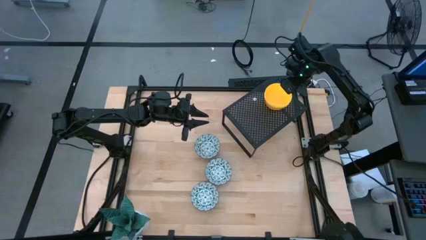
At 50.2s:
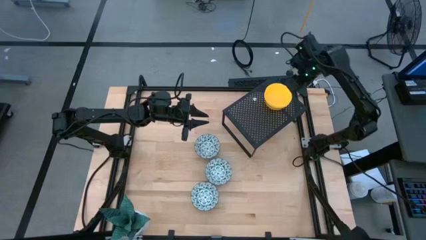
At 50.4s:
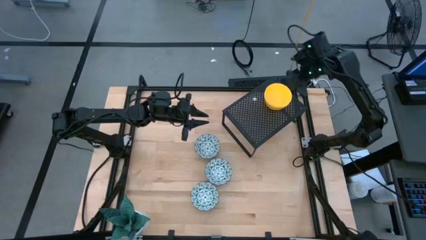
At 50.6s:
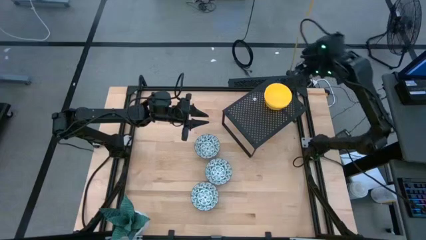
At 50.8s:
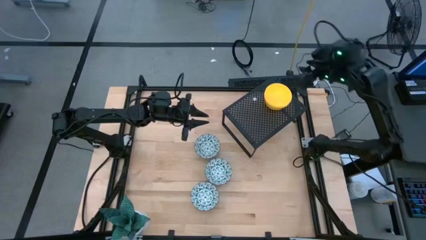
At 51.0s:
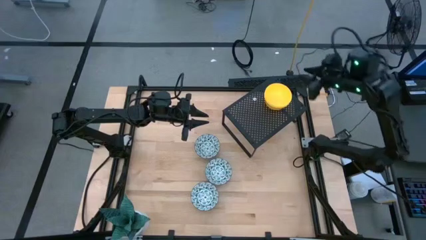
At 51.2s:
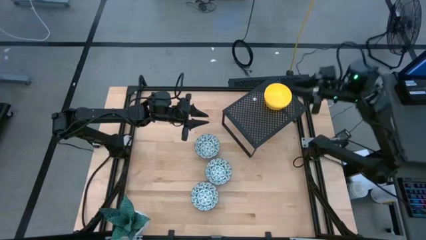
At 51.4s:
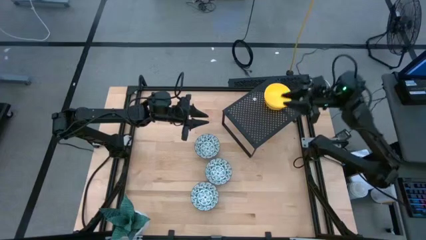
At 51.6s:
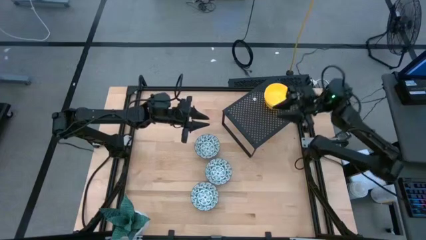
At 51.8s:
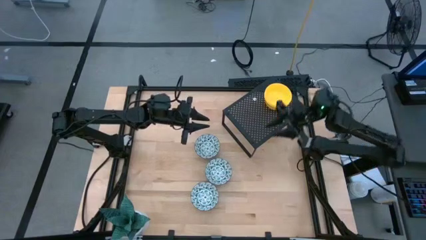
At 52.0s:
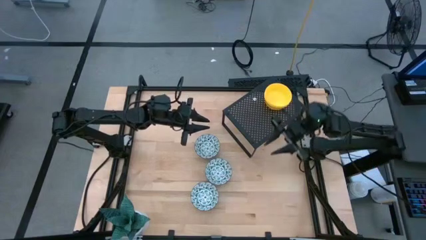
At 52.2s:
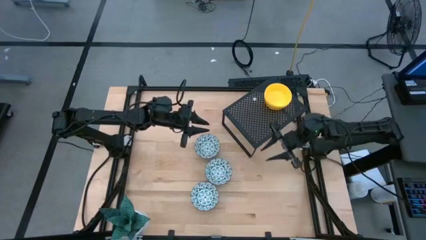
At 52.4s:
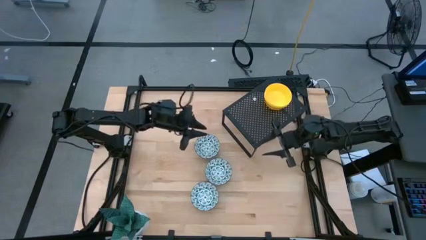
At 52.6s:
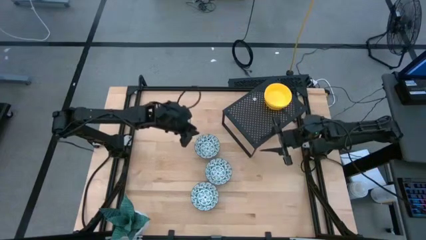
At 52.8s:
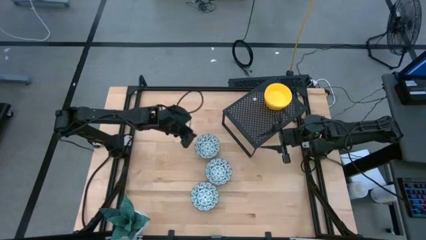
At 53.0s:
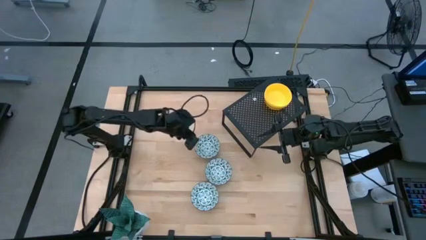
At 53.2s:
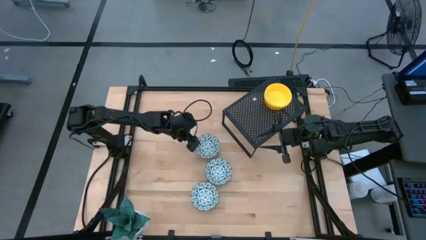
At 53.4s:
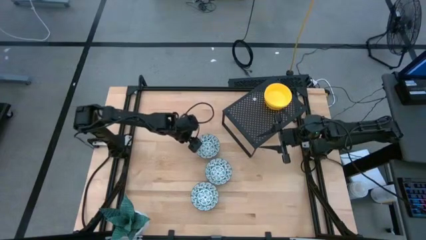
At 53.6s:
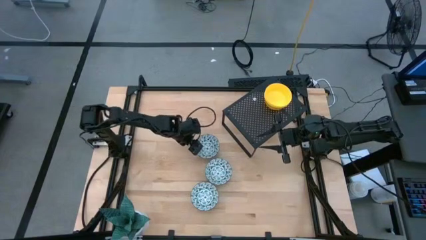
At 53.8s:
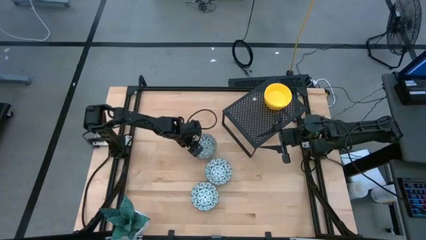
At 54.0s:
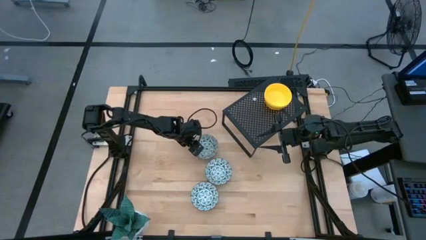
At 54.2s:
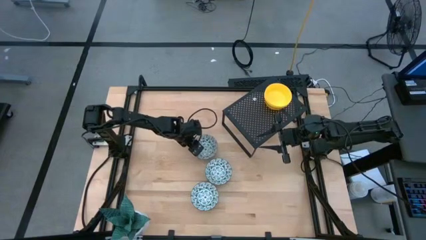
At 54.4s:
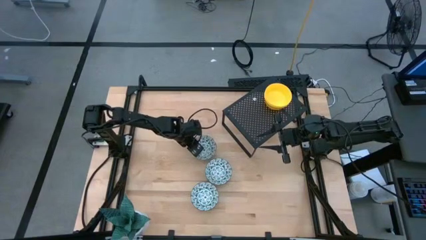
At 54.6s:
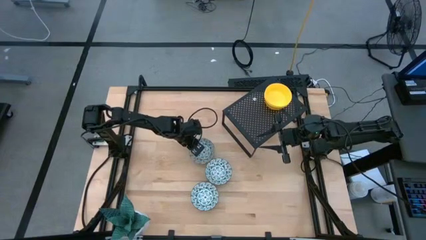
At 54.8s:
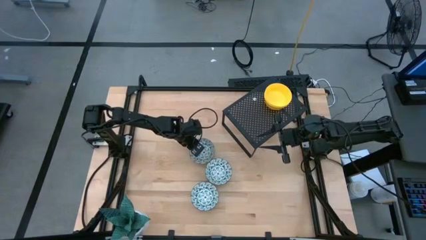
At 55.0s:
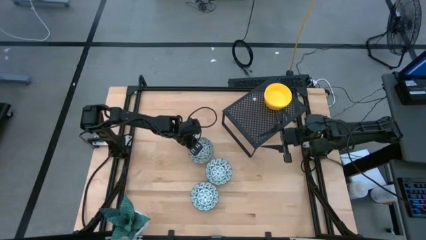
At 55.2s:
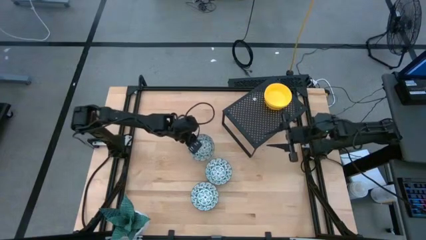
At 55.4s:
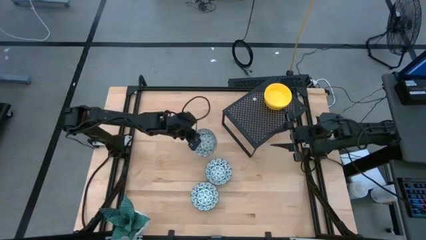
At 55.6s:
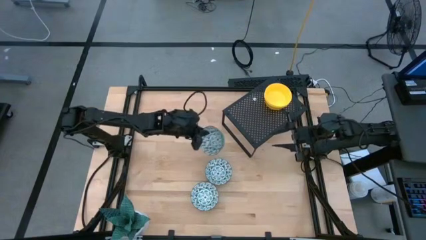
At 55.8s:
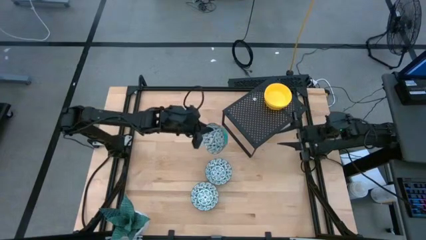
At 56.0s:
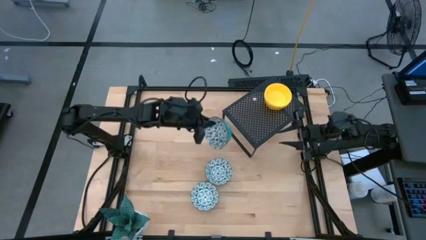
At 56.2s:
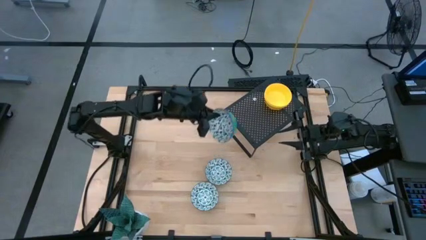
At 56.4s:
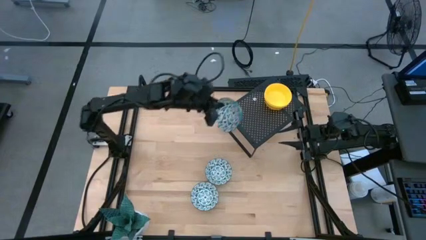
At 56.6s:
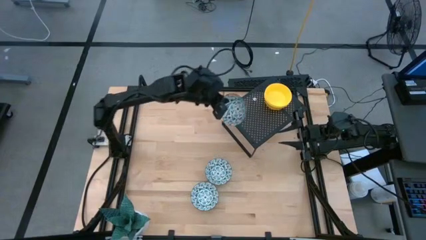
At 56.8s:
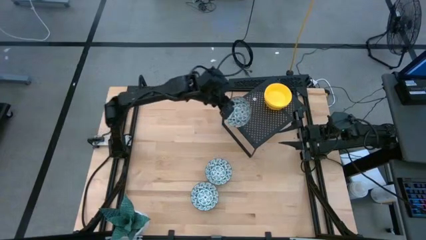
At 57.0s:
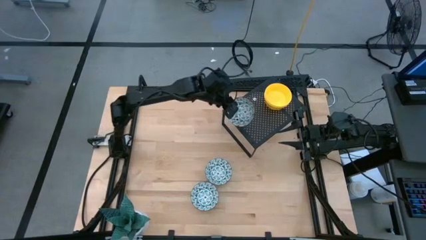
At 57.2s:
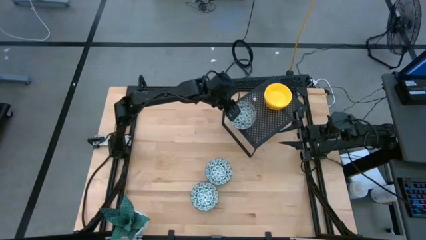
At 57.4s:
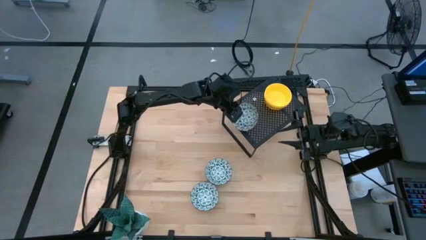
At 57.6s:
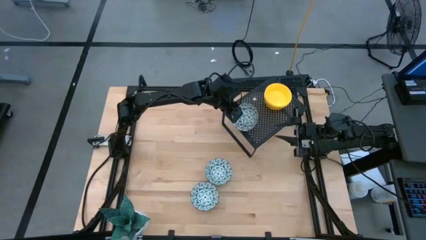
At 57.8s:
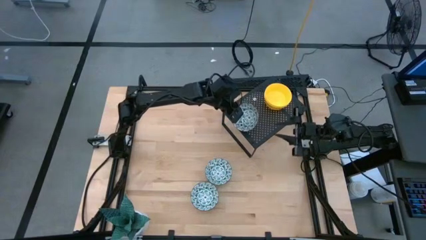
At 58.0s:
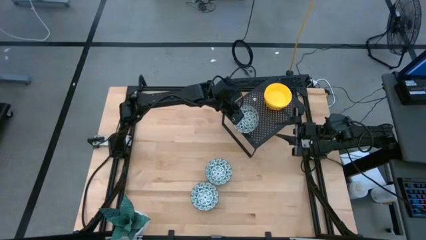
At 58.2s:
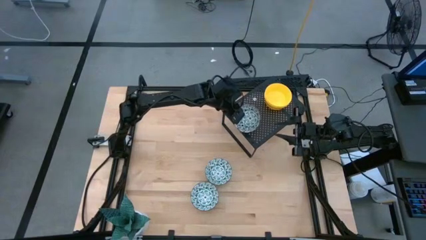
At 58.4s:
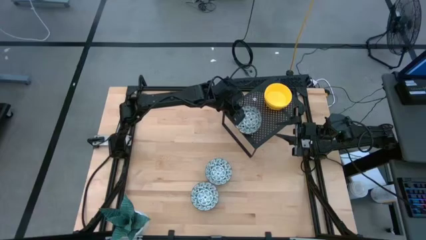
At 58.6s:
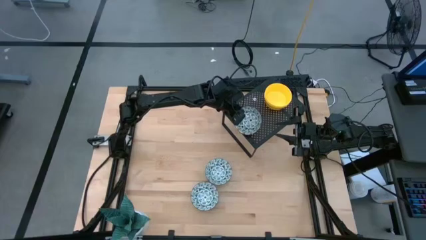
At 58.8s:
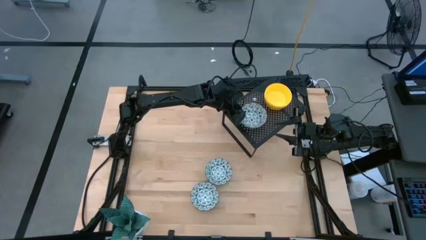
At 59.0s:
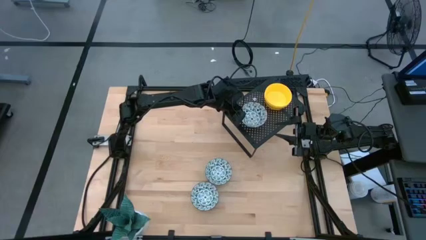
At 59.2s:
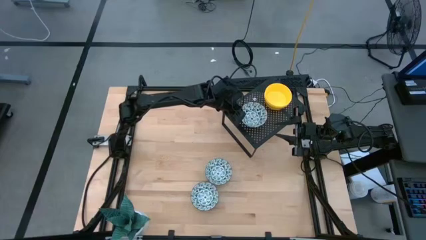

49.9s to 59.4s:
Task: Pick & Place Mini bowls
Put the top blue patterned bowl on the shelf

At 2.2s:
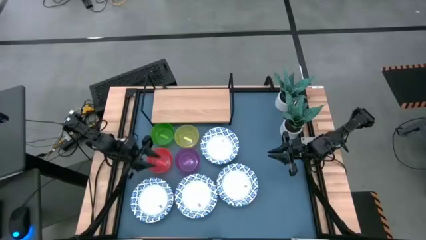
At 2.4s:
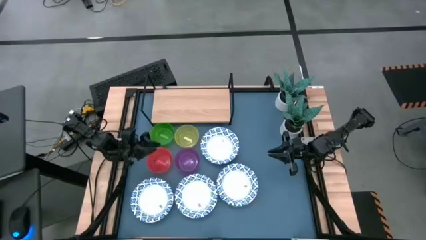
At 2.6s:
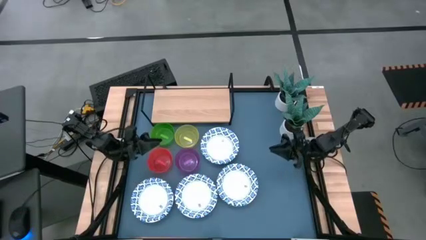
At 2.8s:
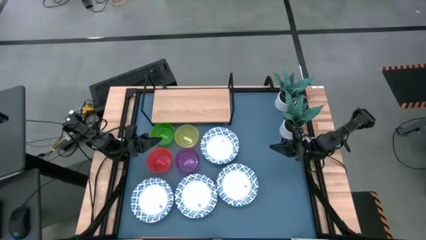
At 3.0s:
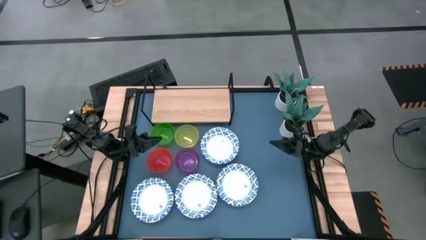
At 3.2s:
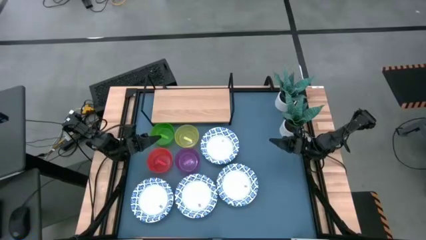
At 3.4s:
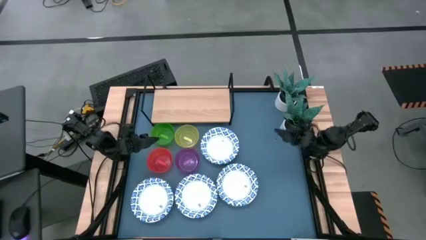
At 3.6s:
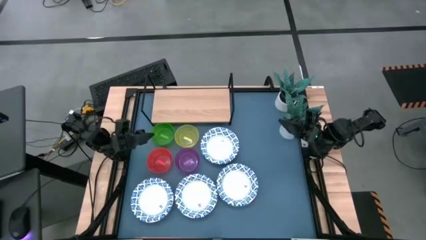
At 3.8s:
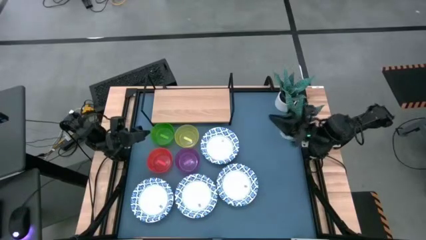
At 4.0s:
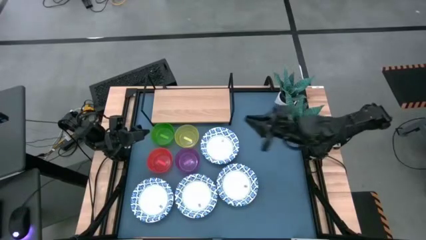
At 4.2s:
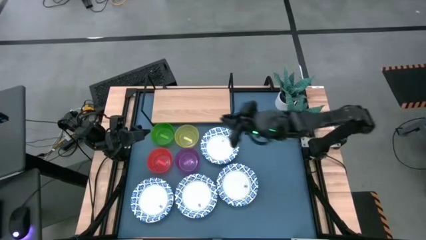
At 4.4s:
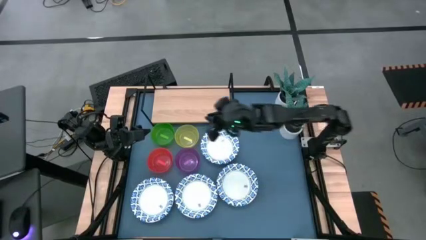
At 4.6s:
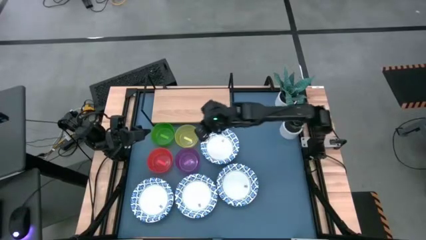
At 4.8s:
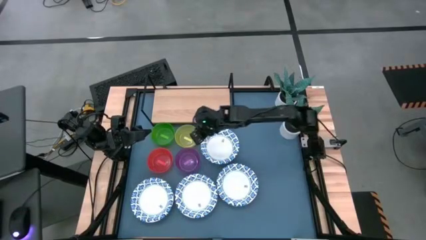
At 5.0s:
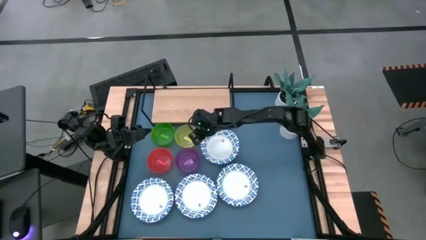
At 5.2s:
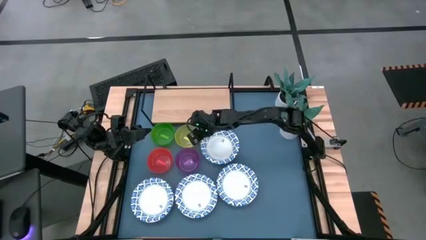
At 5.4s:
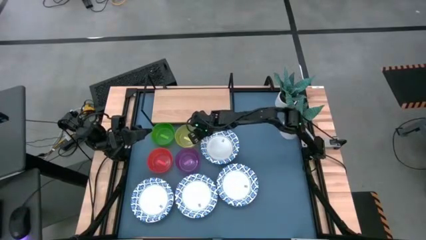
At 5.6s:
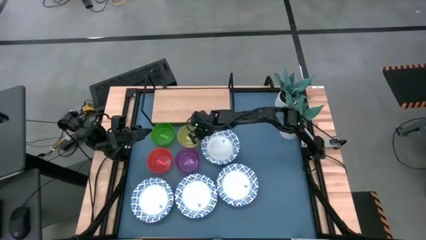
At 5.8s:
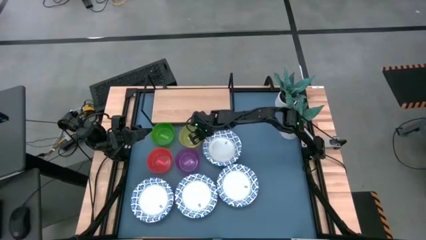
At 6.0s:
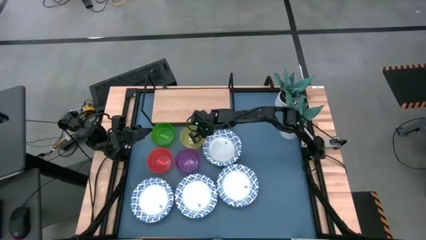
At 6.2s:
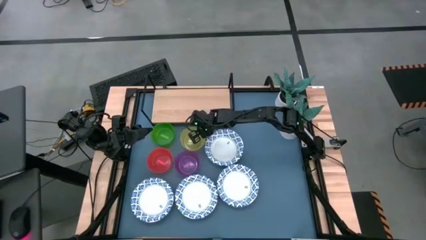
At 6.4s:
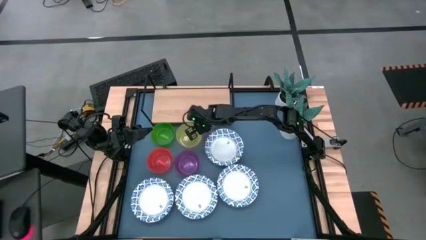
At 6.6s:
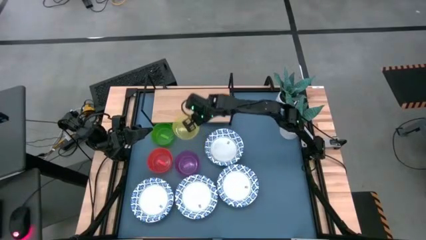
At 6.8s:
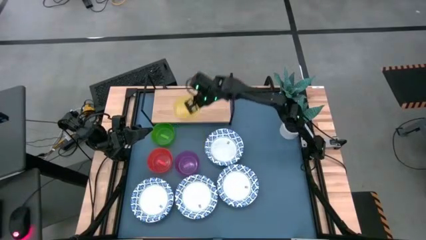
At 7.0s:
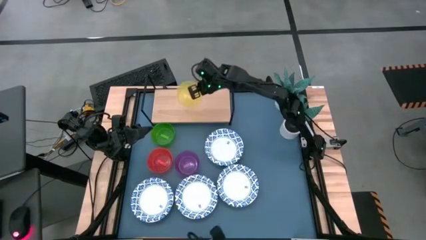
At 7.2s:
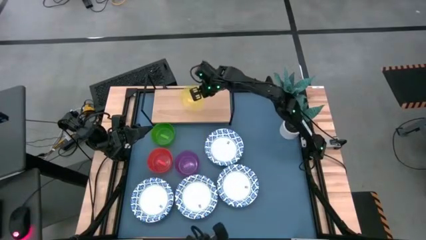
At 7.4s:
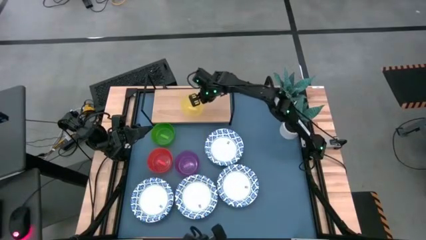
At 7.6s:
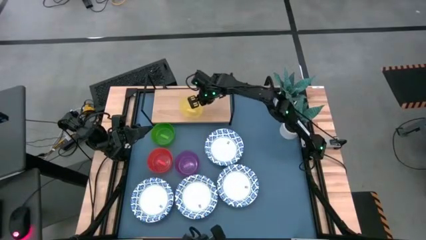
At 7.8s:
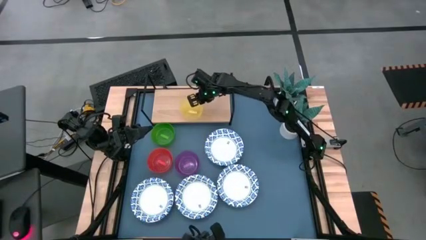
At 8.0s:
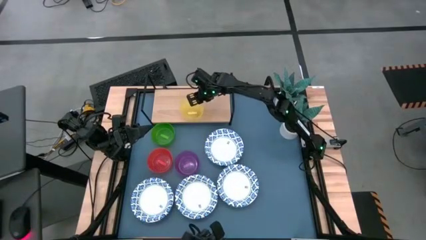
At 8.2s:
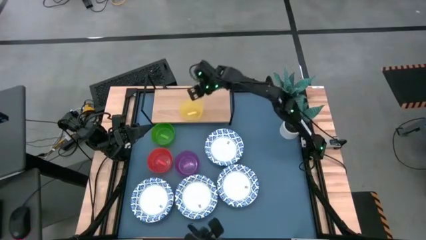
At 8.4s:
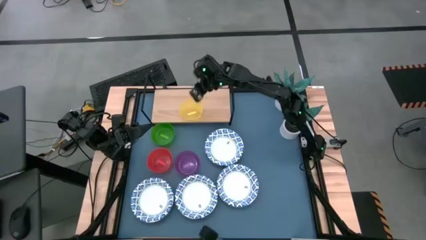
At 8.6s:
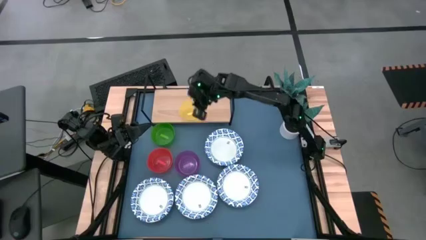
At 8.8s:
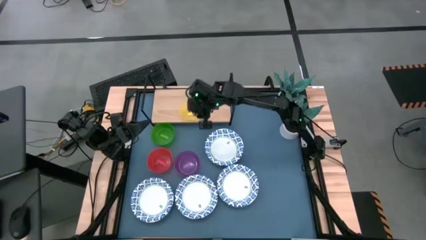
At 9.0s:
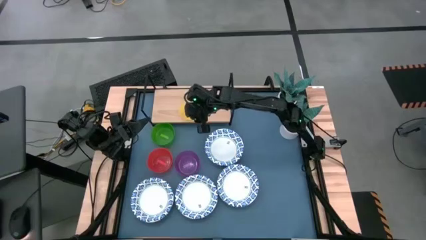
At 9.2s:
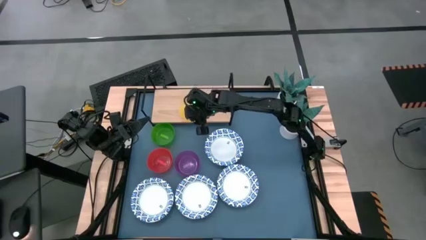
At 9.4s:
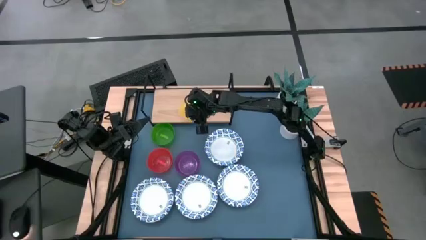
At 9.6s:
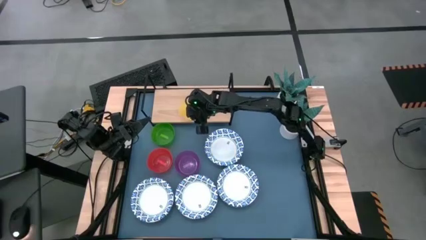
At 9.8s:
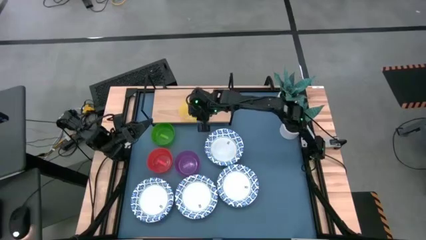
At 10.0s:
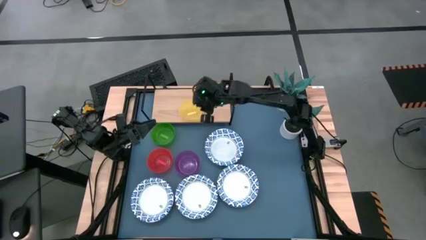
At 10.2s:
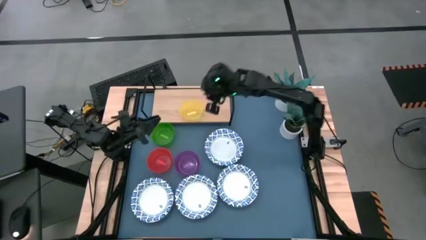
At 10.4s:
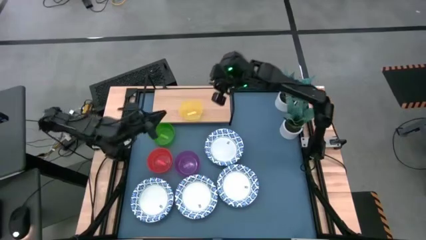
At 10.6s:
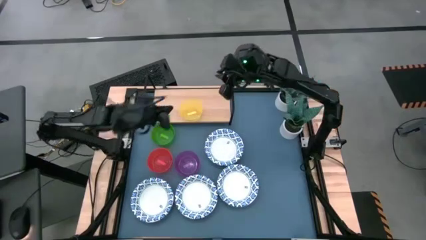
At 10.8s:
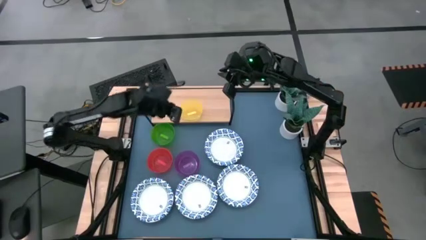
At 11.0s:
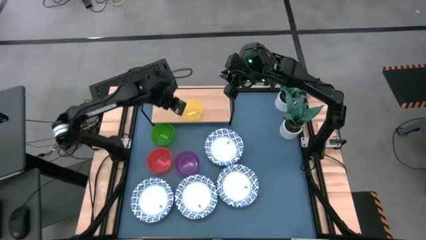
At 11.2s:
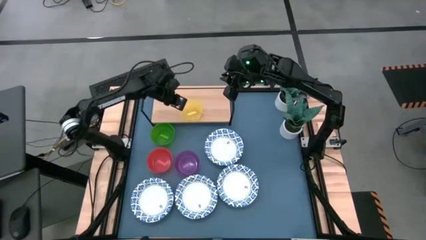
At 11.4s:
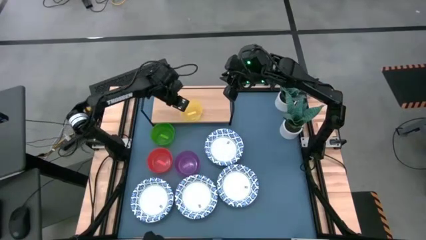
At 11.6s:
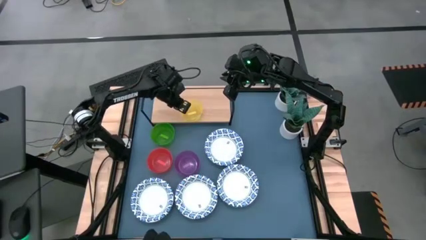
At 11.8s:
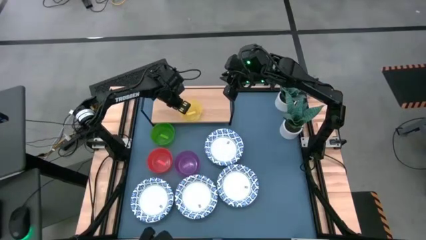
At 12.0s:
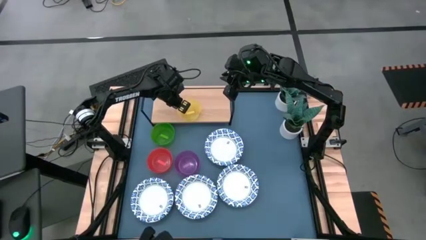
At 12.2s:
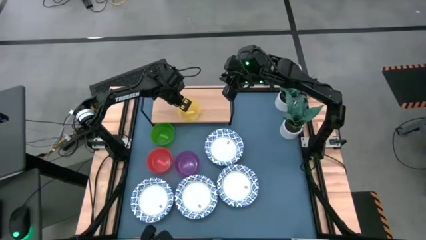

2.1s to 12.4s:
Task: Place and stack bowls onto a shelf
Put the yellow bowl on the shelf
